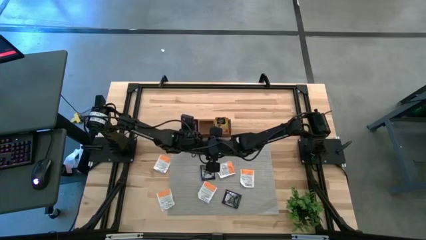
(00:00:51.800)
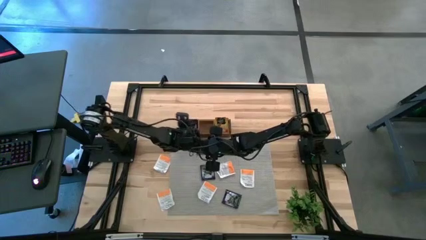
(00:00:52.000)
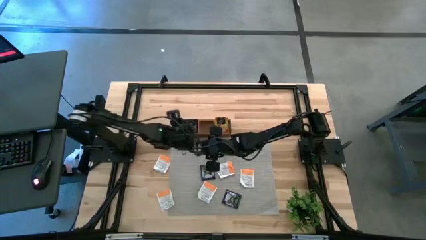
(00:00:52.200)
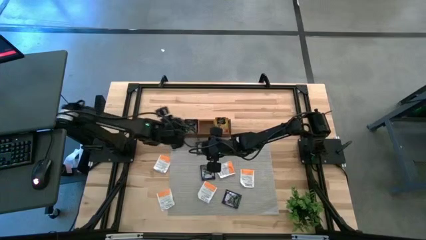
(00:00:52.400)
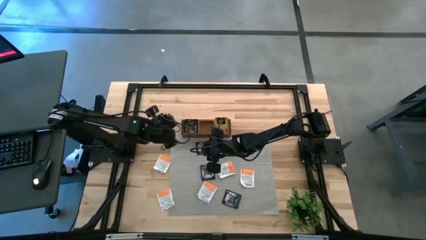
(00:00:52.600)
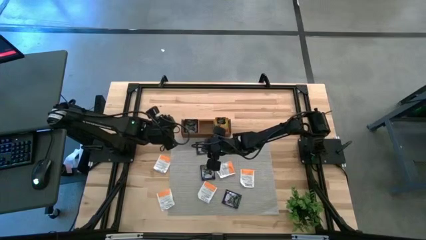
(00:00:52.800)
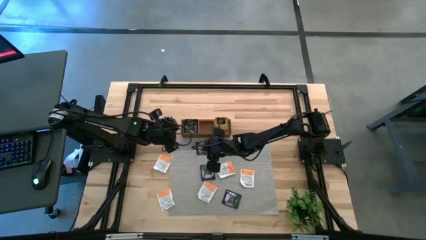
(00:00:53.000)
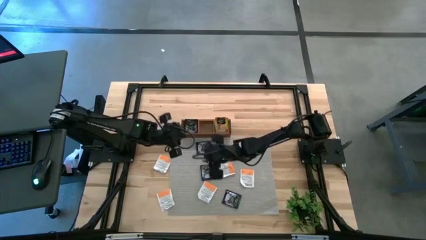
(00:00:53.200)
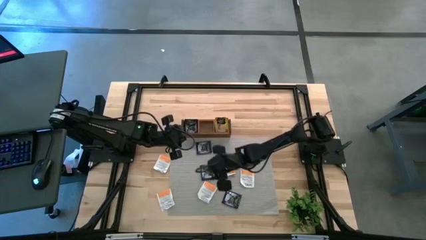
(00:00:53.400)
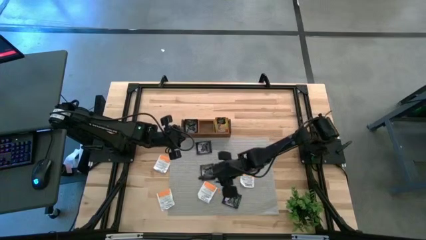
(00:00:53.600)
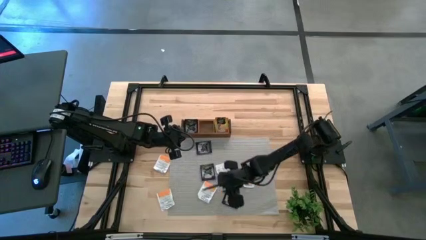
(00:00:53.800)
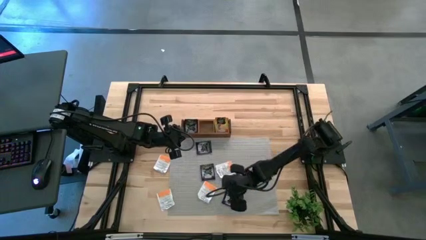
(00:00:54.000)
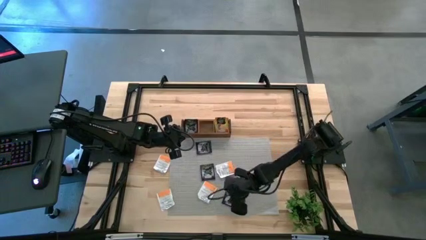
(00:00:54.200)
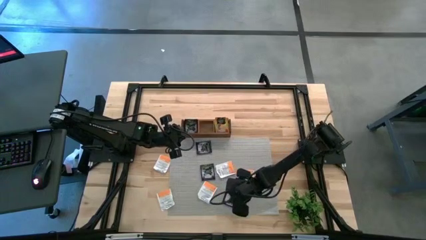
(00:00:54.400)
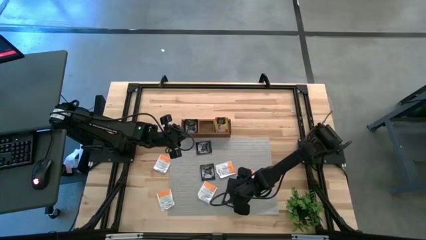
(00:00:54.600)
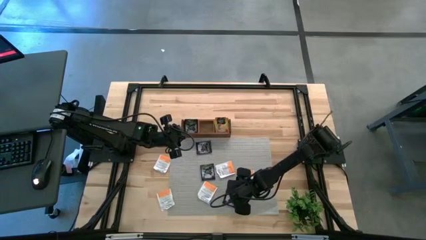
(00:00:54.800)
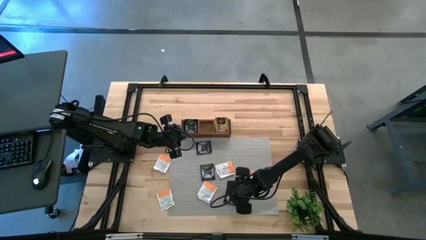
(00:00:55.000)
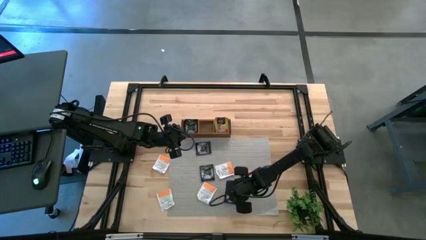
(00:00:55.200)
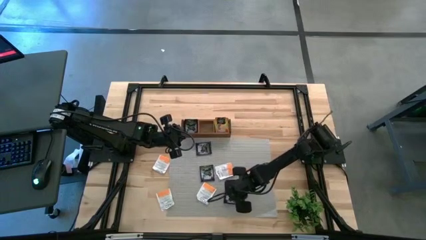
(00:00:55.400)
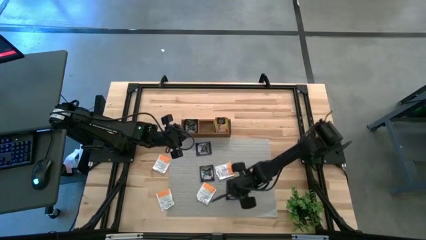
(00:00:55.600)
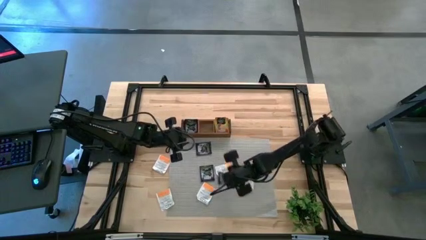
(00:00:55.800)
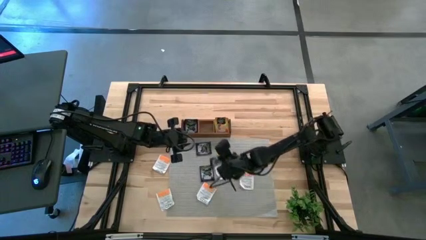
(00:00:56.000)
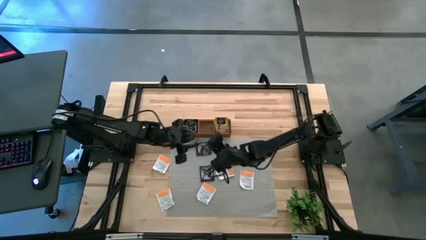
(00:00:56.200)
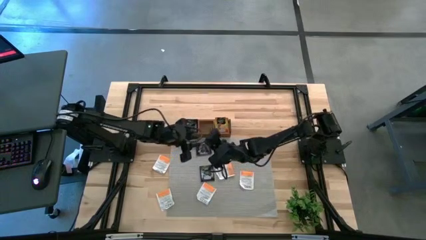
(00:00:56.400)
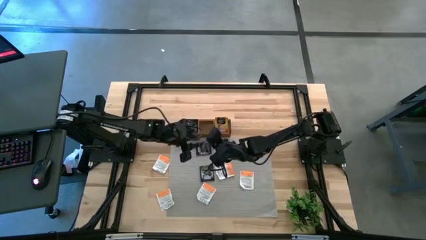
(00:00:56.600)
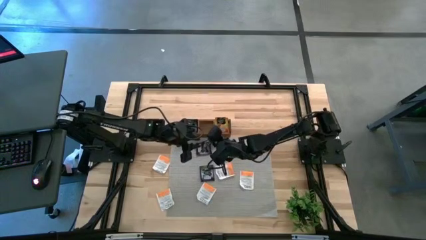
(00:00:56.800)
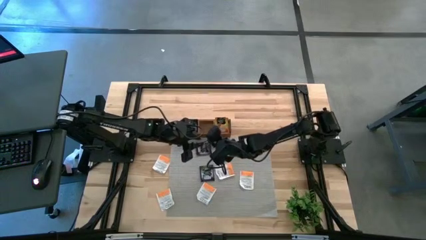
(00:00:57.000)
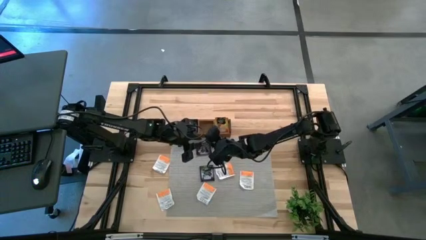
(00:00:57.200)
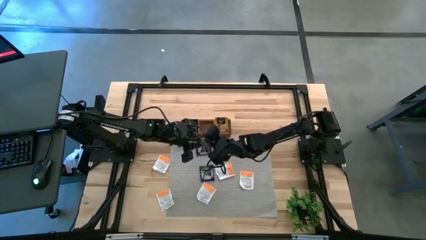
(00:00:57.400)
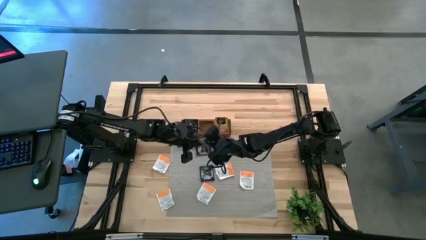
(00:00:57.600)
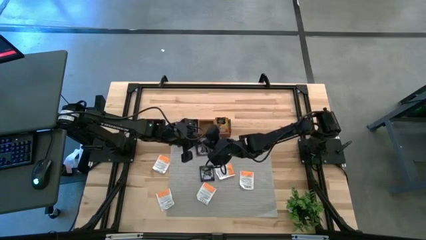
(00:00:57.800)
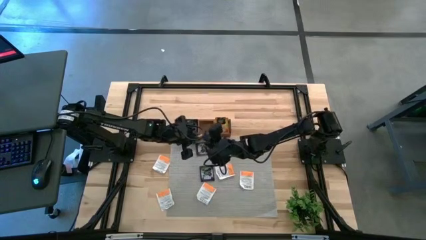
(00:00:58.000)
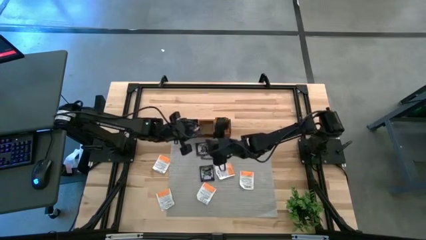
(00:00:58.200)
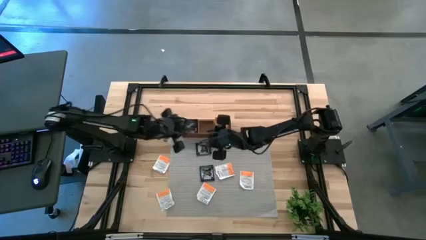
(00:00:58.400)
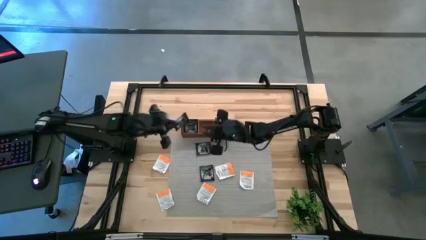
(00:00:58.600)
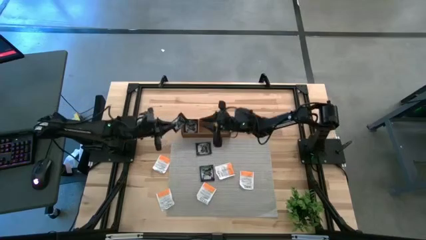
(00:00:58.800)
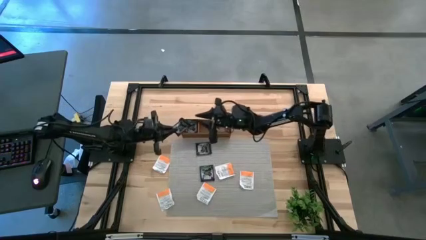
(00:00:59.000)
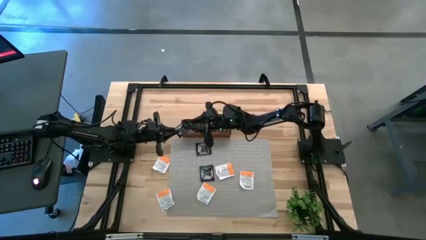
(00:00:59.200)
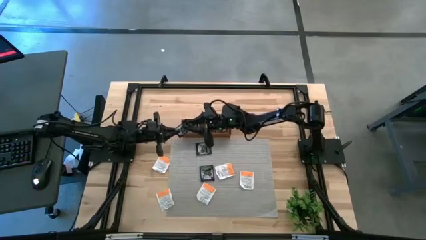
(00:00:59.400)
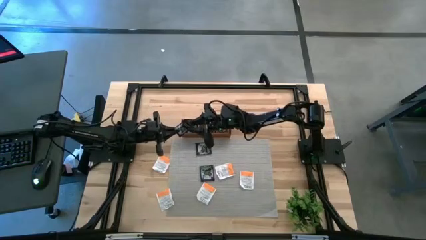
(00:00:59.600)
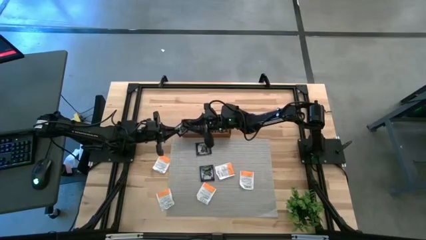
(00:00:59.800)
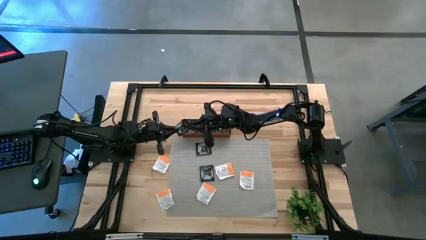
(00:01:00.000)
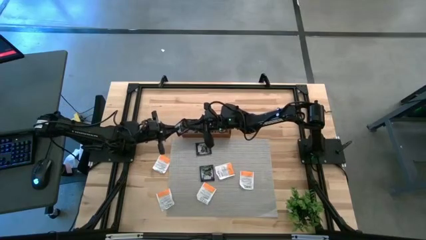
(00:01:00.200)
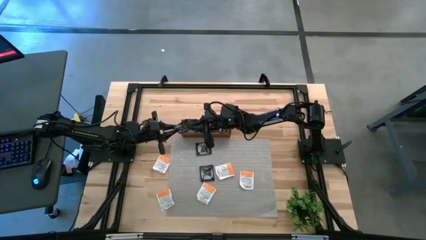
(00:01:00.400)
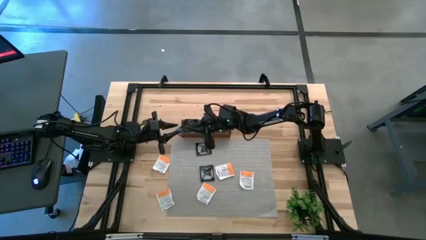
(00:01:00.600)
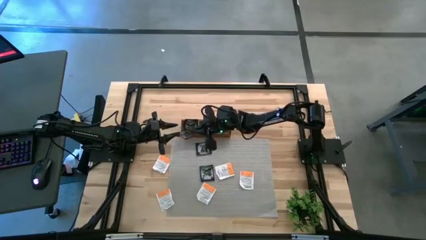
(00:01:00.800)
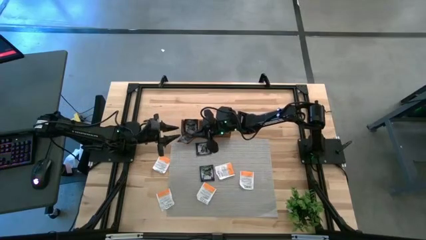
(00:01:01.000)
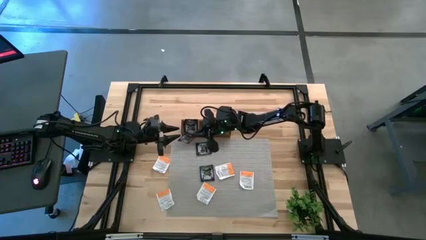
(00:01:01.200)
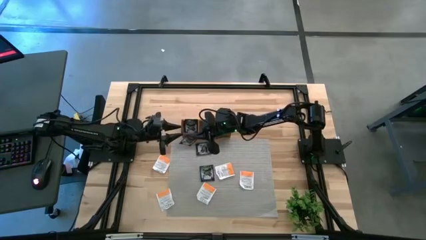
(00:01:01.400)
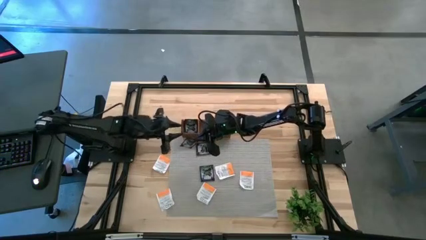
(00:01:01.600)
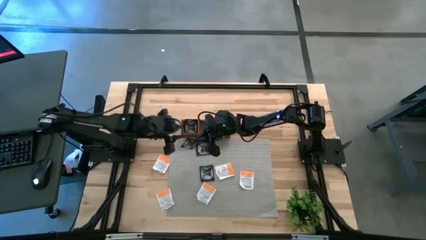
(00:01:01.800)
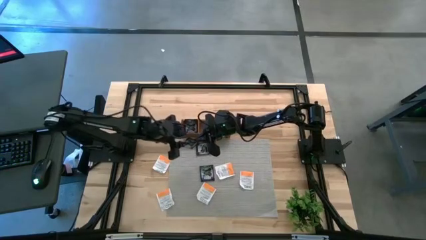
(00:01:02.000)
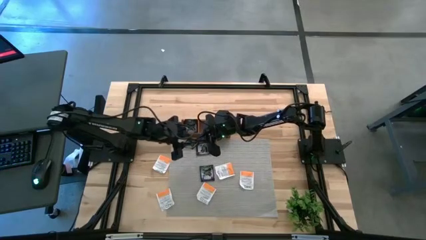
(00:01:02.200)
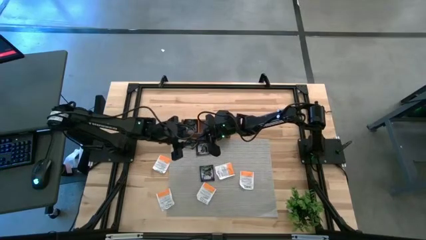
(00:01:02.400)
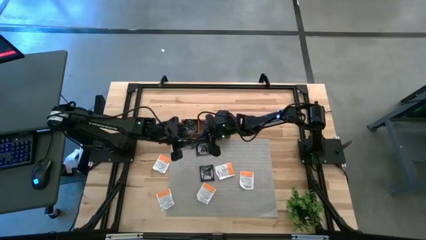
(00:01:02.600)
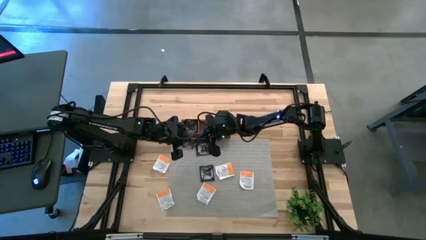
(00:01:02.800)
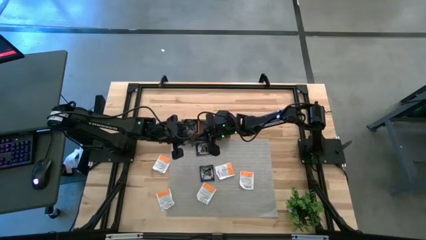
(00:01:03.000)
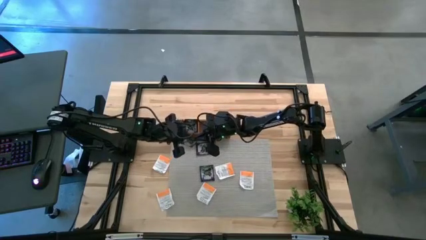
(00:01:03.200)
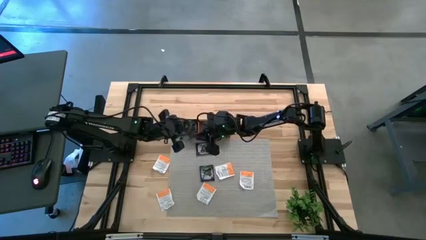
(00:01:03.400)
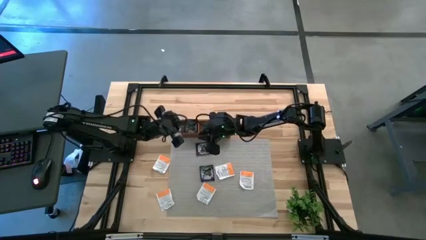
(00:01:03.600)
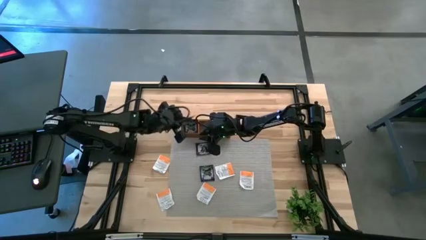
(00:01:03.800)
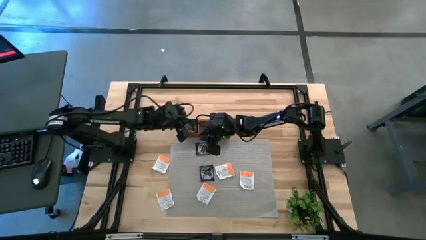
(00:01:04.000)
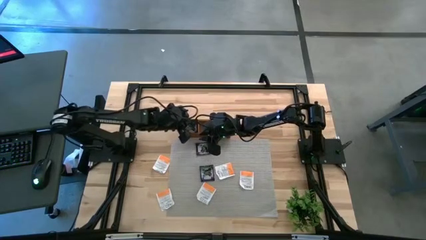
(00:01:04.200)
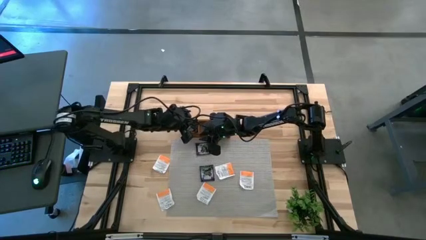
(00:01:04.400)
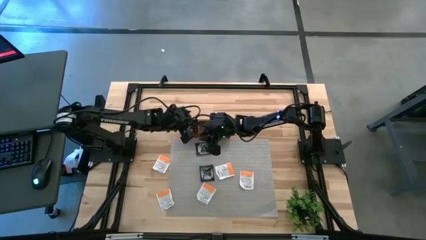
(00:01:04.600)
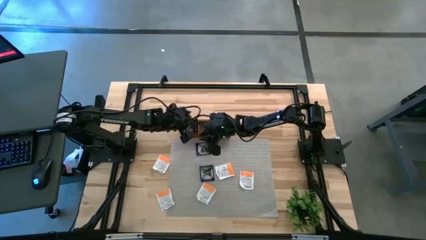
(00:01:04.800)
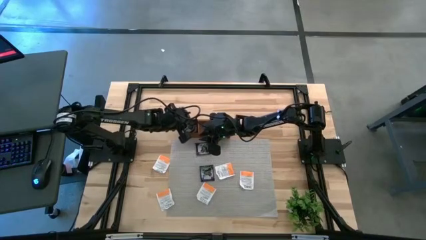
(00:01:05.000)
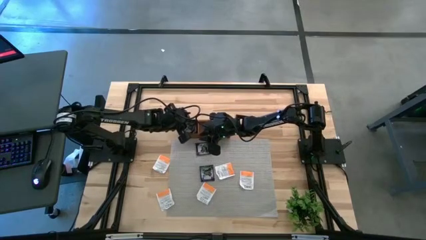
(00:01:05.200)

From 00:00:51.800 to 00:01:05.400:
Task: Pick & Place Tea
Put the violet tea bag into the left section of the wooden organizer

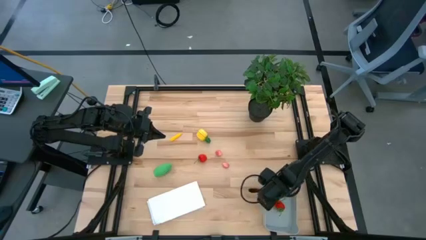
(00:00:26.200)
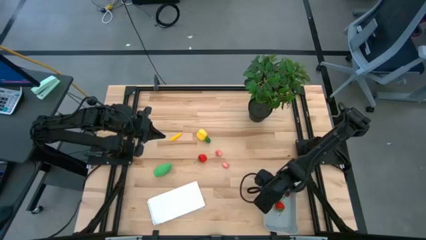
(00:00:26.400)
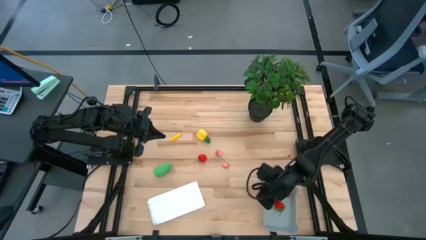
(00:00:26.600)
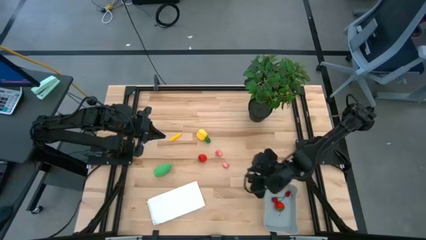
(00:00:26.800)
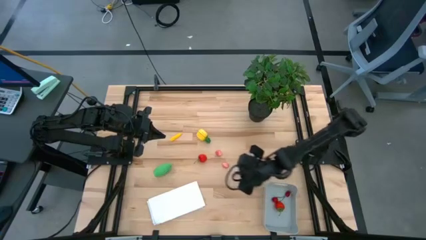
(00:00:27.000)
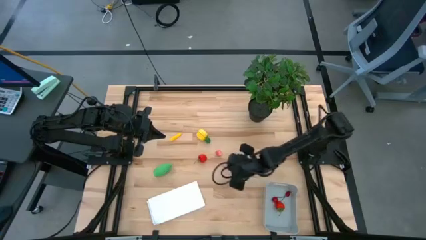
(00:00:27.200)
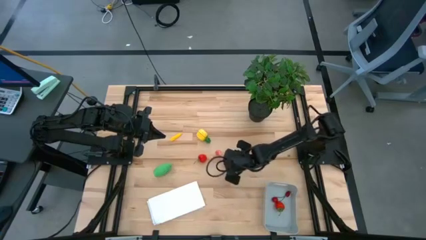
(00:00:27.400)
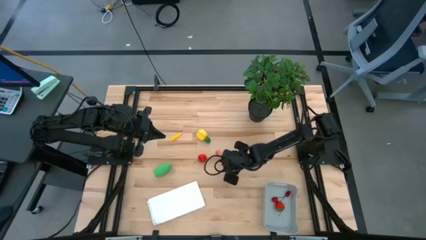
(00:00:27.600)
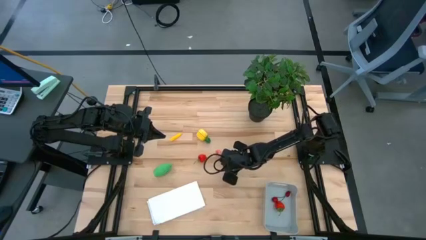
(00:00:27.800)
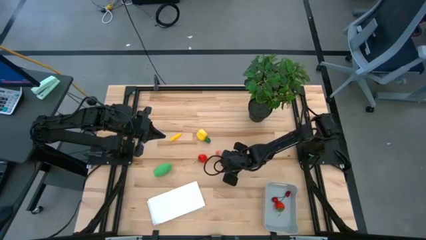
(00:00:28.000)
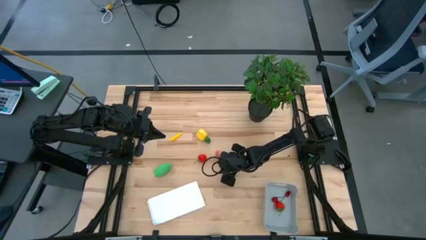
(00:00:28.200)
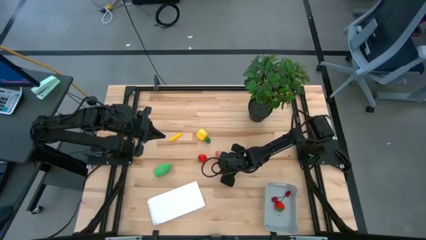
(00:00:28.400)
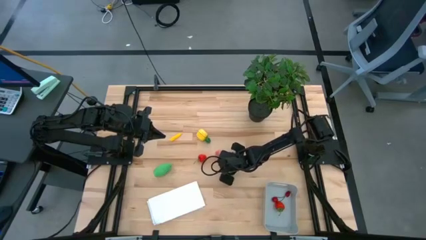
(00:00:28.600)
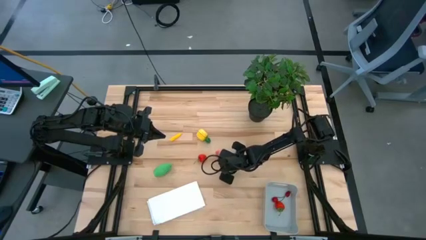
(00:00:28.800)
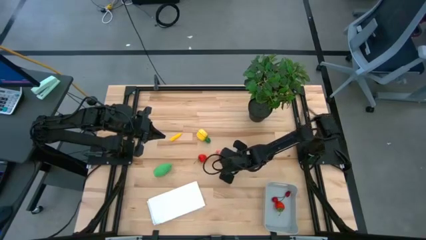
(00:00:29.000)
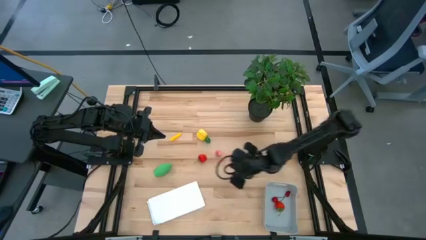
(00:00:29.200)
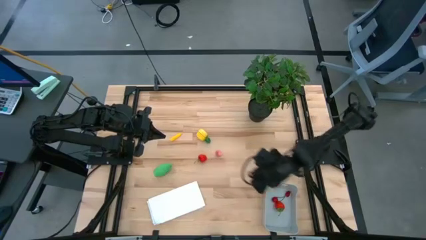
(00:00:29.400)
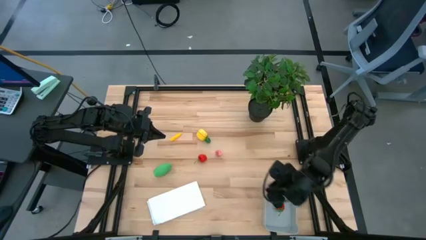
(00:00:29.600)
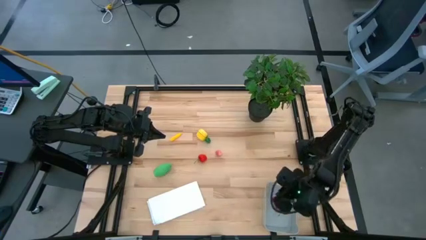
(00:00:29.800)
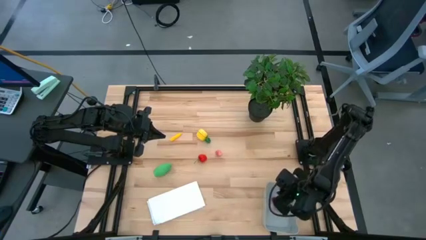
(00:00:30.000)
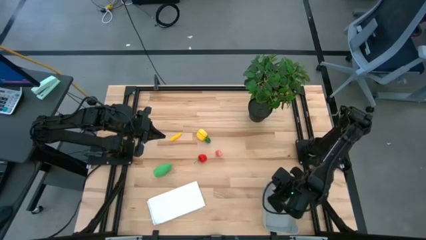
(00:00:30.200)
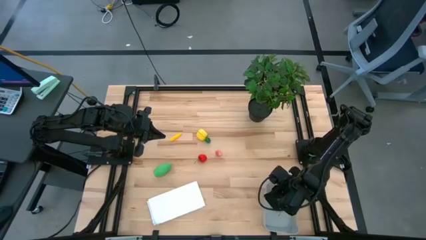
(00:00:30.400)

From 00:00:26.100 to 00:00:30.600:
Task: Pick and placing Produce into tupperware
Put the bottom pink peach into the gray bin
